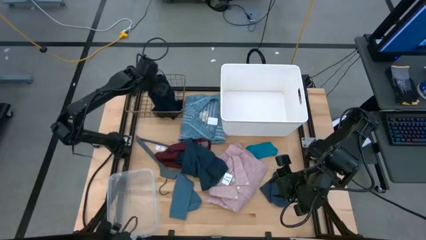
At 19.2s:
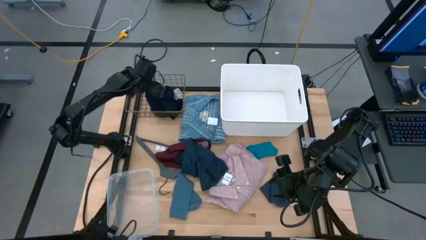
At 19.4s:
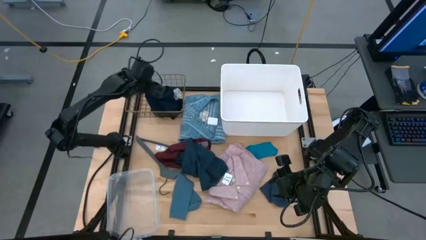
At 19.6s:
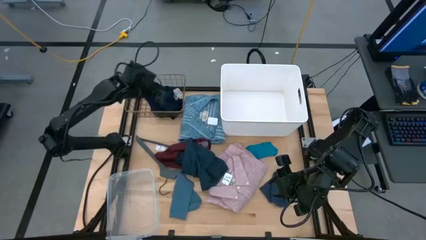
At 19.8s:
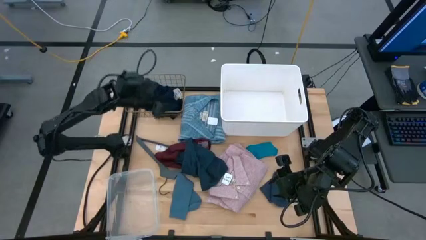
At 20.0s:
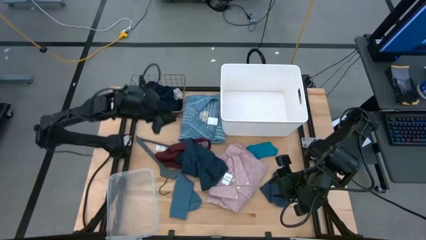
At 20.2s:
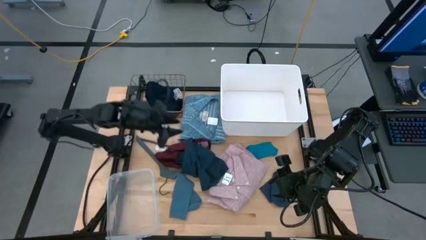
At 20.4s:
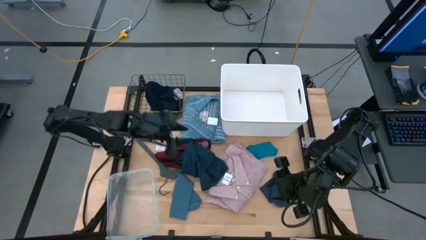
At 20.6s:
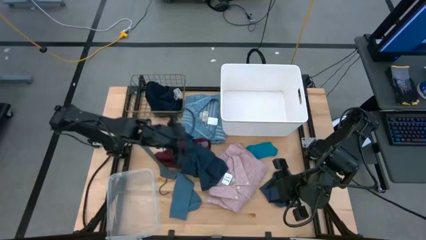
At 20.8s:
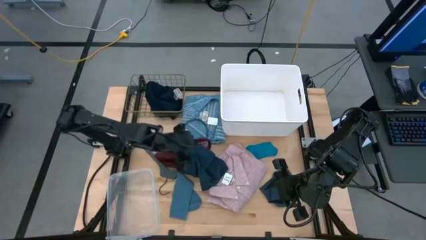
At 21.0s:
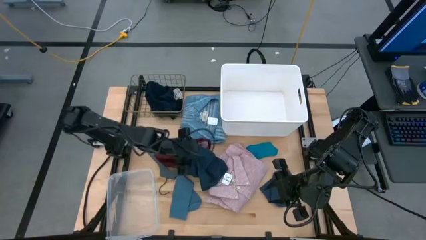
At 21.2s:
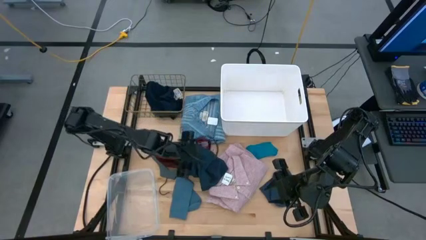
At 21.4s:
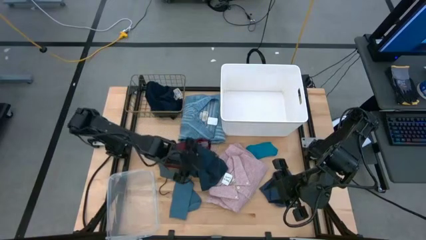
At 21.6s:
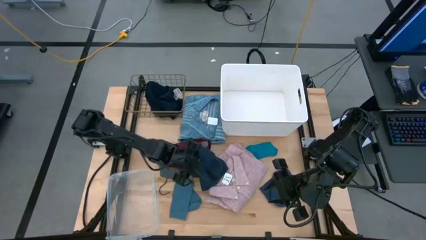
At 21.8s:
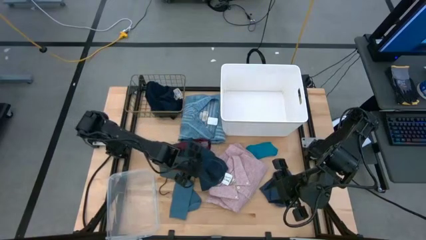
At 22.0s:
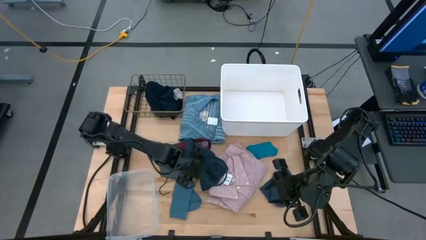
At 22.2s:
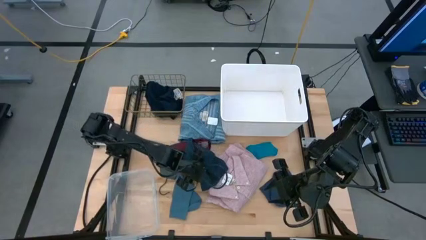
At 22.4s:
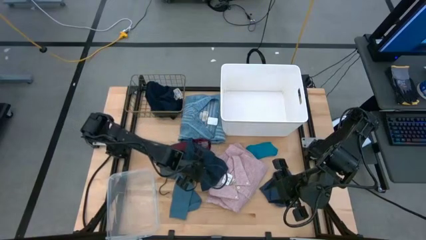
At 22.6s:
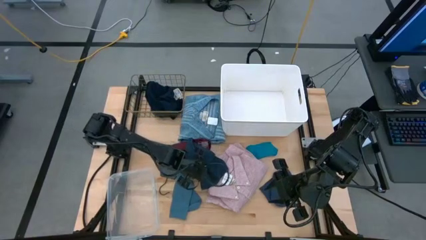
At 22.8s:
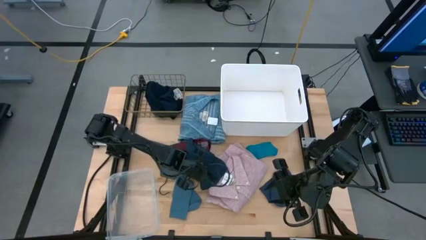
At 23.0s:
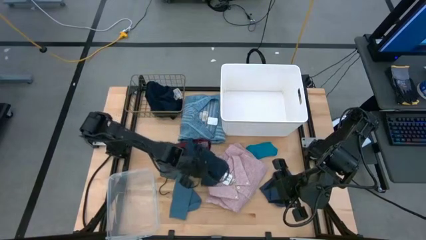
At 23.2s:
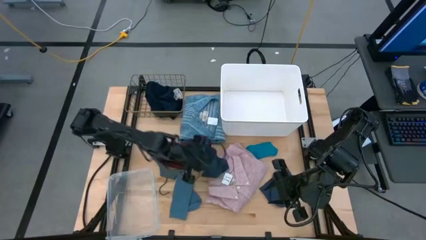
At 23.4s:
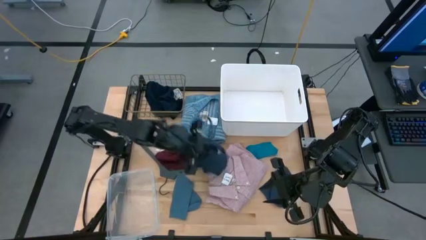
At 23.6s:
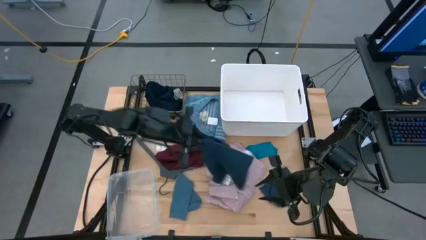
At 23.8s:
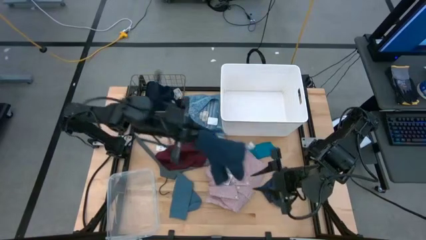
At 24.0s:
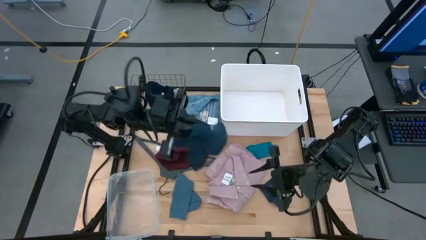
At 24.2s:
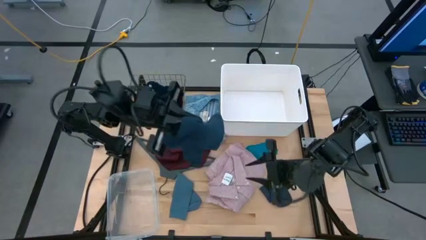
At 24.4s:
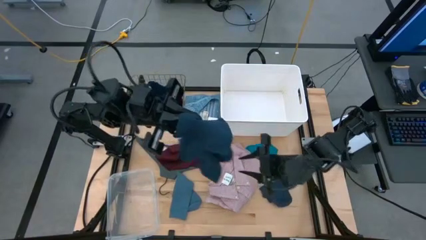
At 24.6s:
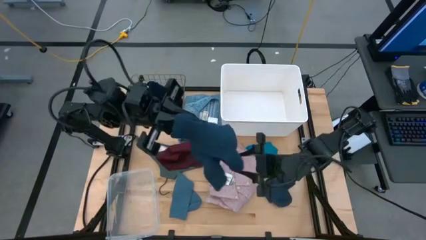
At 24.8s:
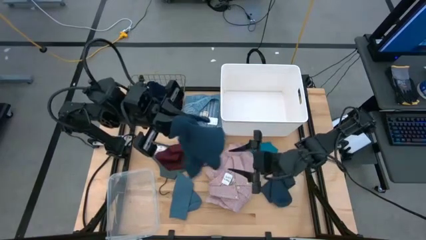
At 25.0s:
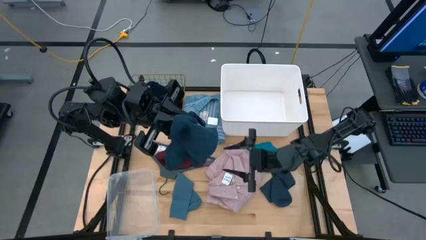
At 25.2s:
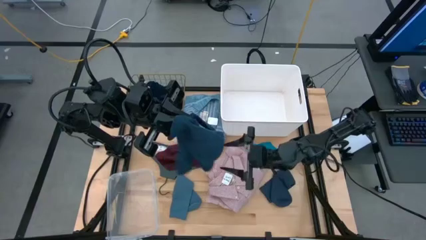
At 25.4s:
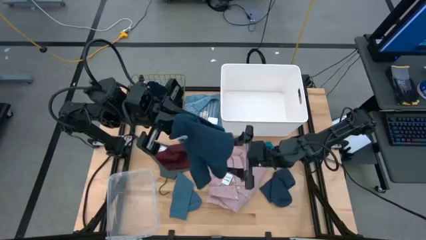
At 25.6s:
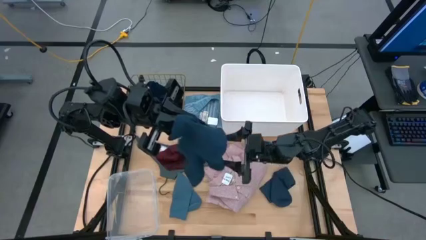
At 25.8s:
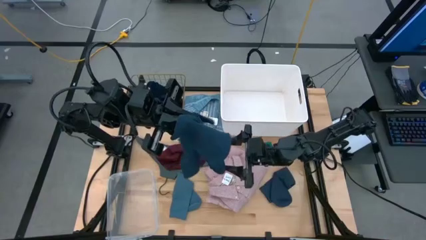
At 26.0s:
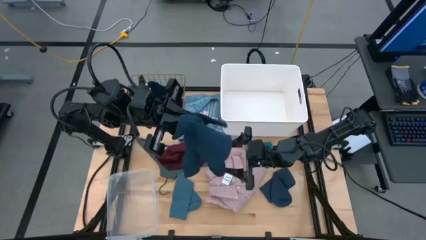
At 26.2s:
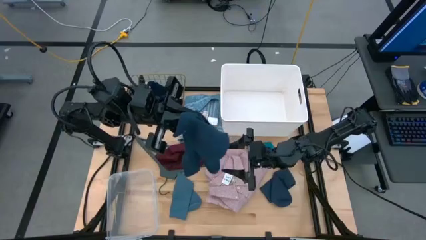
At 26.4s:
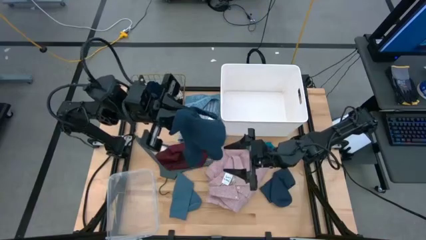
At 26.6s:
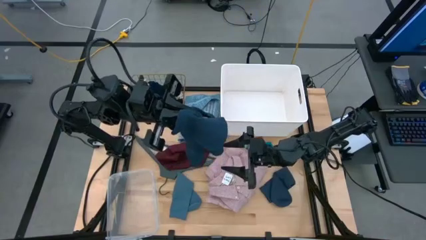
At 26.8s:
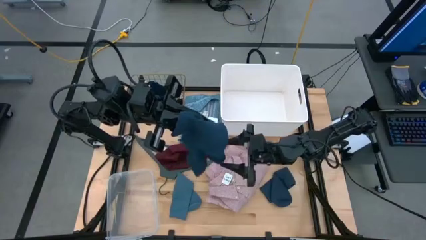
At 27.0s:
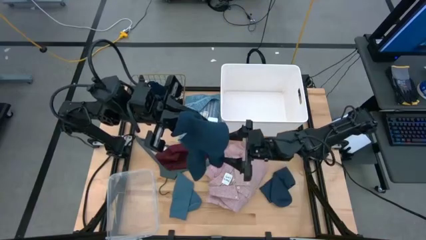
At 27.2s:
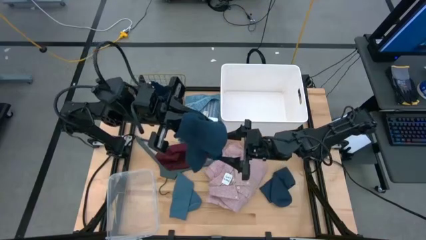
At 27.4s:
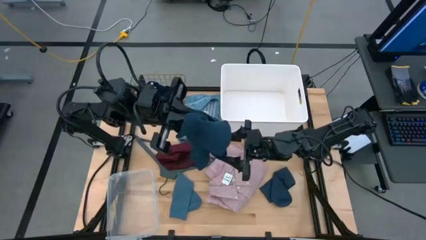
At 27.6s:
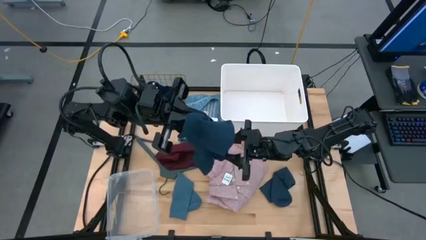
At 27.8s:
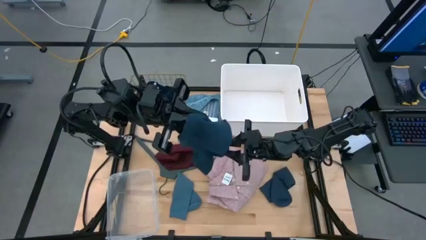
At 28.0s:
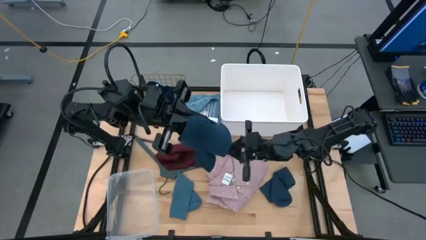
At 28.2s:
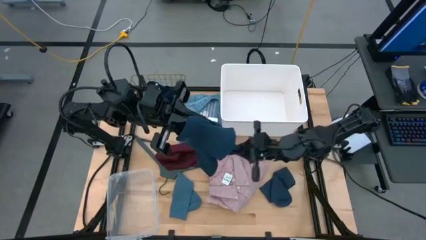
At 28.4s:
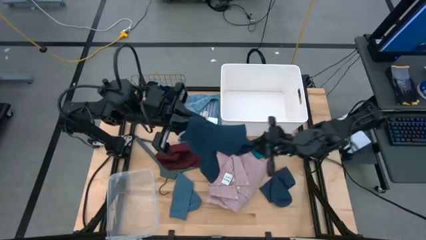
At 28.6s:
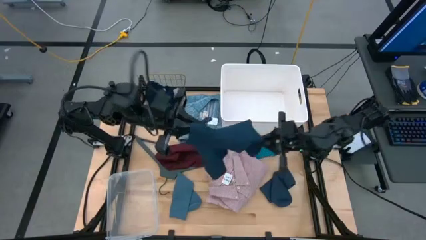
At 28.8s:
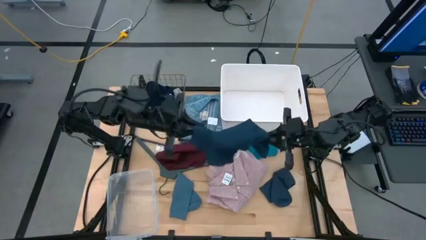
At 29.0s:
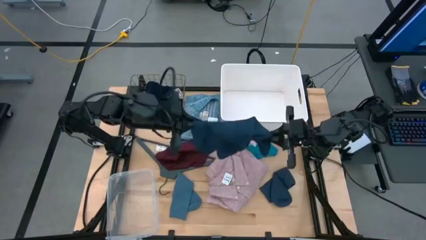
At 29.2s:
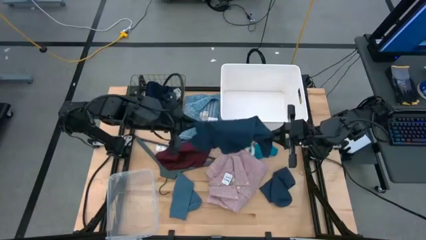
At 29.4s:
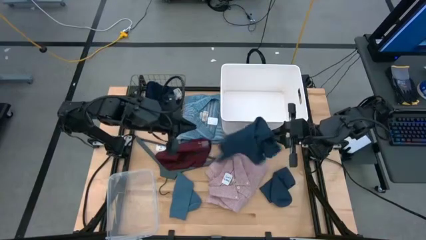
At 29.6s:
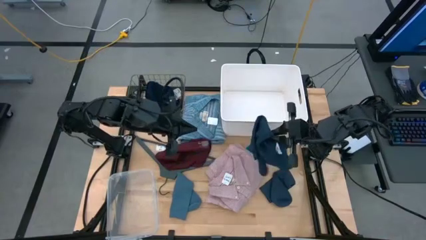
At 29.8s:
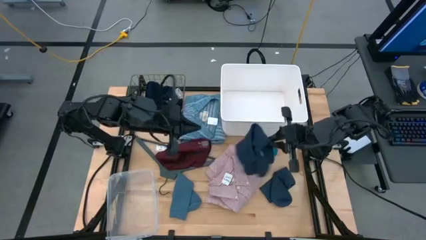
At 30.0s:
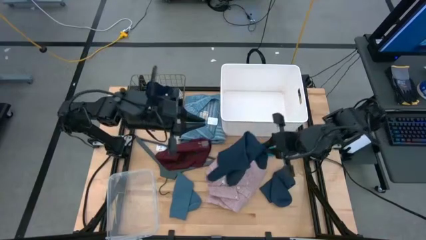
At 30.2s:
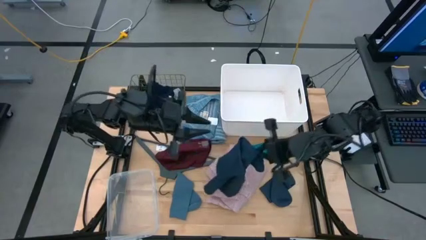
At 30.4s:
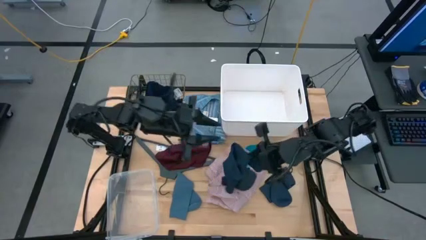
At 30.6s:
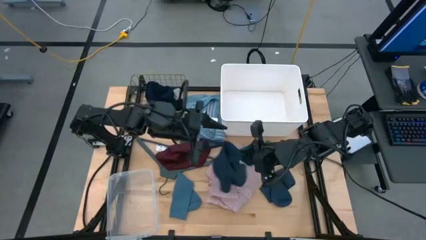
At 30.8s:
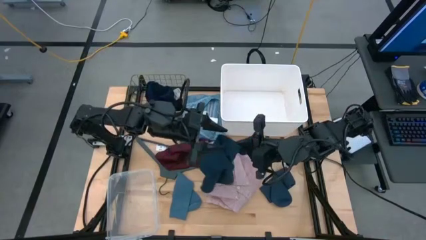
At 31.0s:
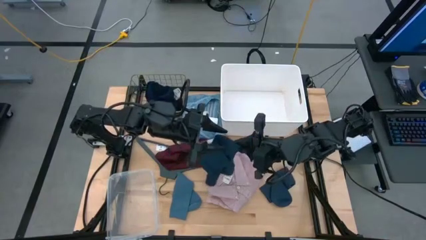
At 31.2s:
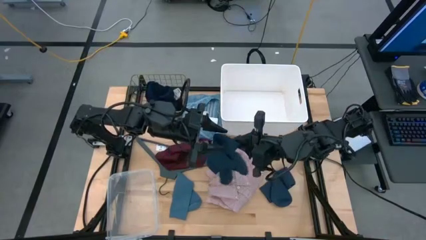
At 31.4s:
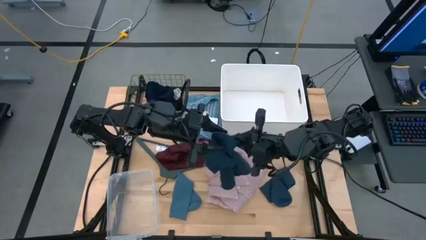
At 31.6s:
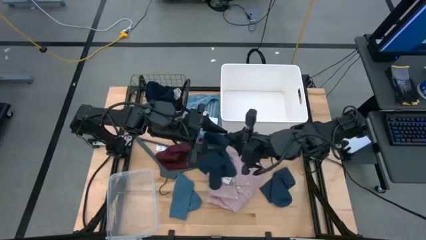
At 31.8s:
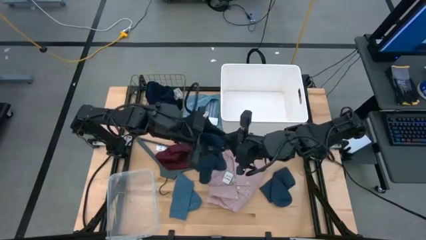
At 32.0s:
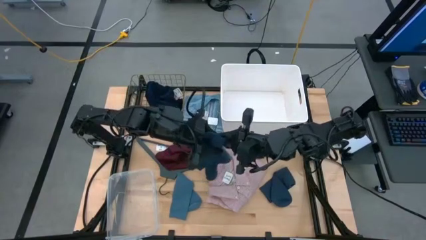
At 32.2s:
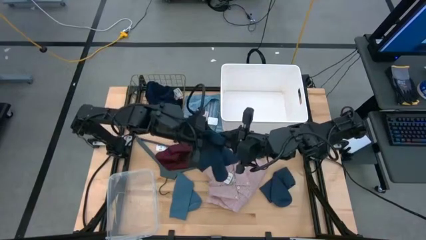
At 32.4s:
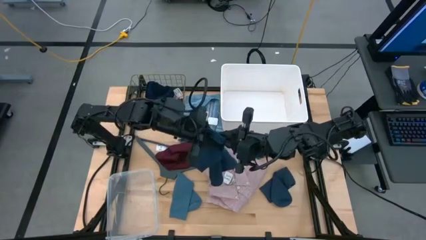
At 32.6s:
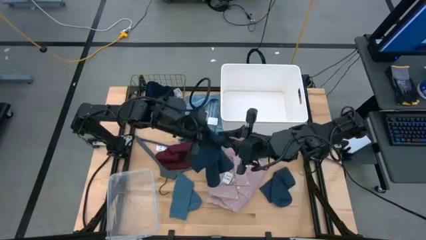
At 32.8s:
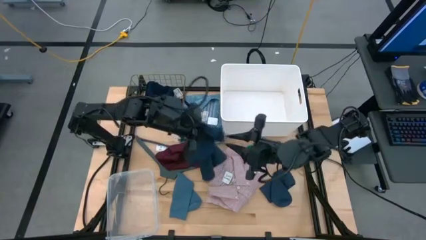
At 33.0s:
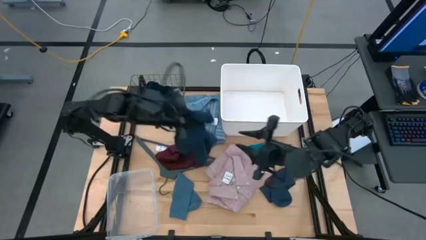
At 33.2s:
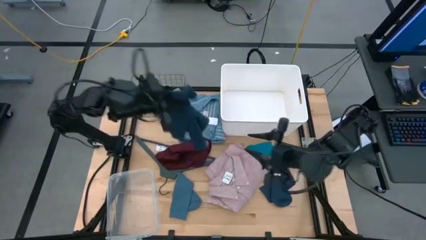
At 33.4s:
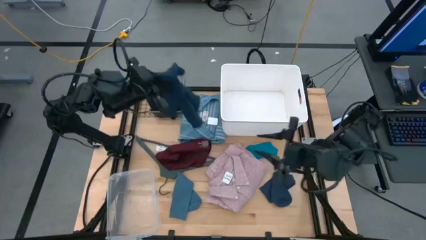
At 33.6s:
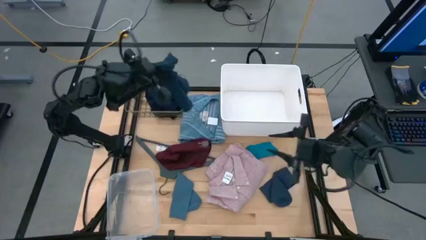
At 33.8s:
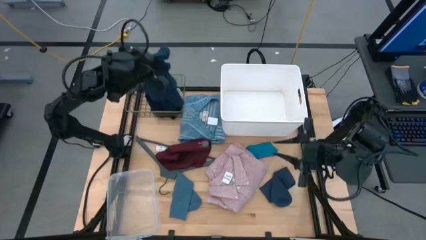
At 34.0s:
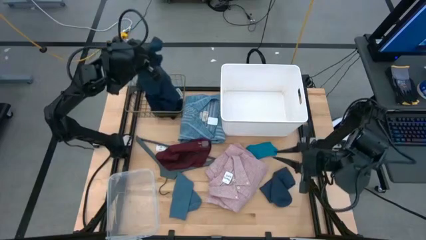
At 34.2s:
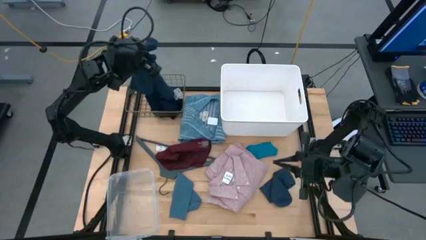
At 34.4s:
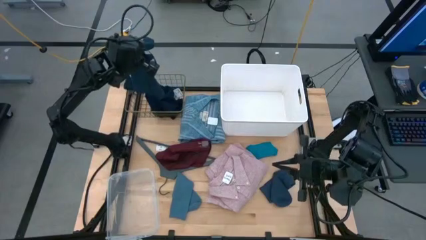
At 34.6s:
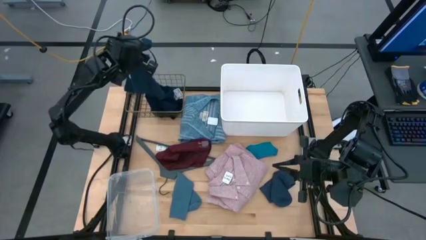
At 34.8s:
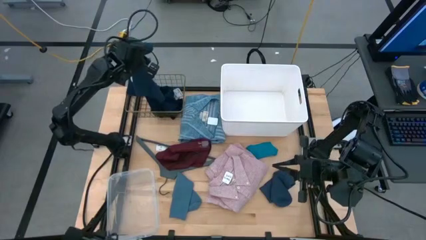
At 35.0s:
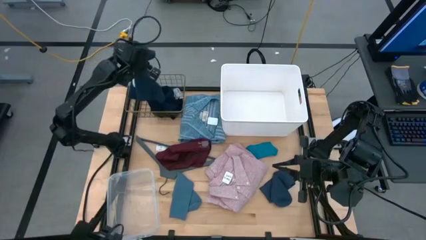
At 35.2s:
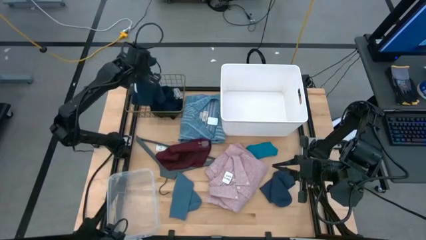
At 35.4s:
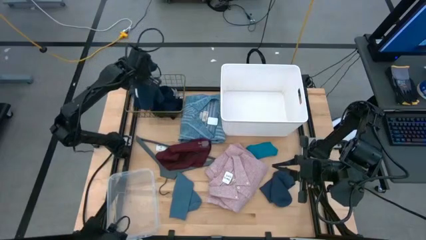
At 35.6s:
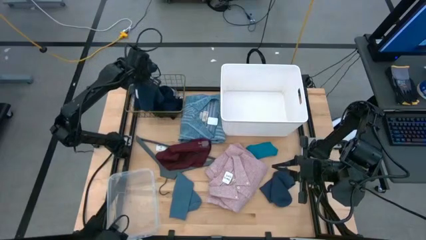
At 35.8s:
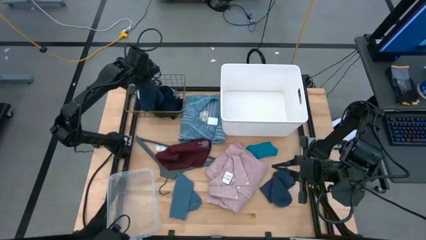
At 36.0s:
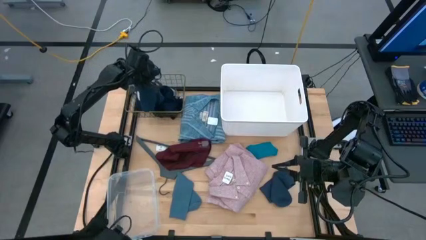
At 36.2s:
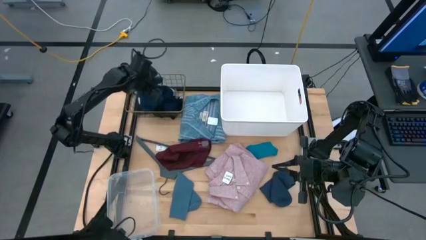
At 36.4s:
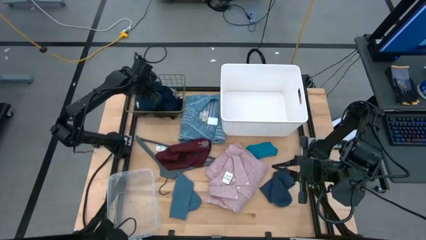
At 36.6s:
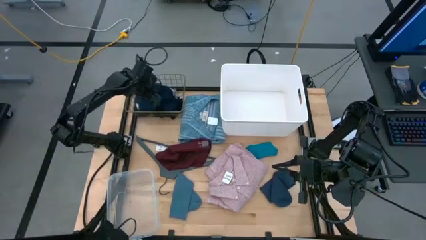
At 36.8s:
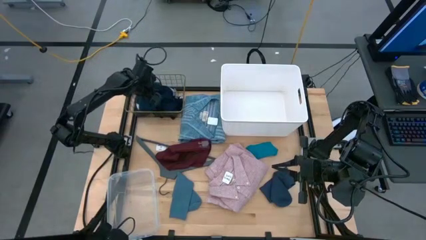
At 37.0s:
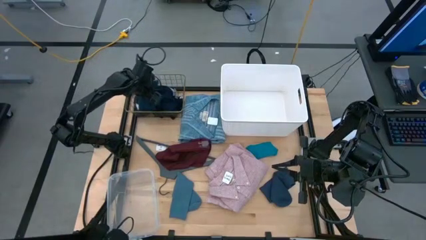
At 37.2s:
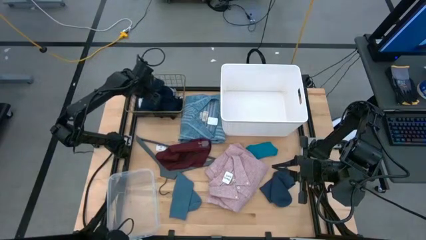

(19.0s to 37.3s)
Task: Pick & Place Cloths
Put the gray shorts into the gold wire basket
